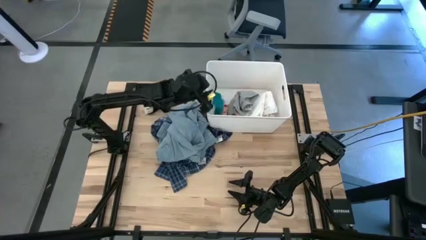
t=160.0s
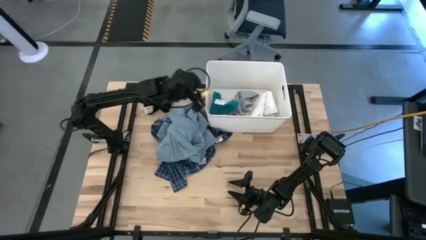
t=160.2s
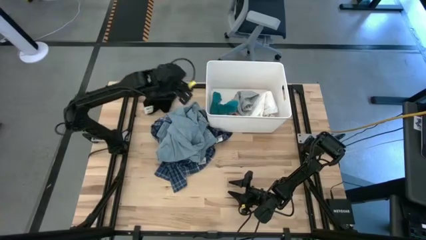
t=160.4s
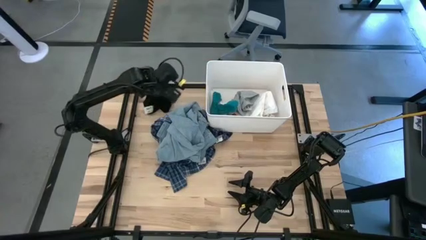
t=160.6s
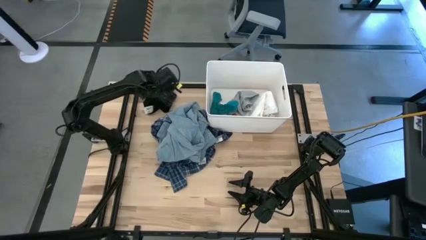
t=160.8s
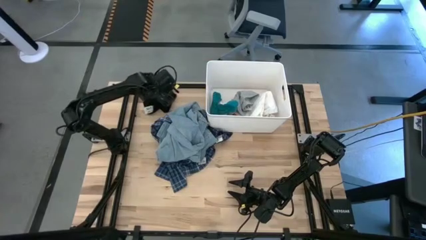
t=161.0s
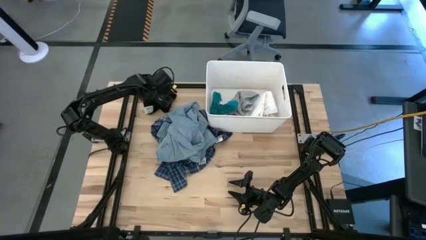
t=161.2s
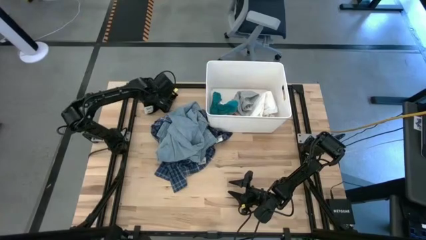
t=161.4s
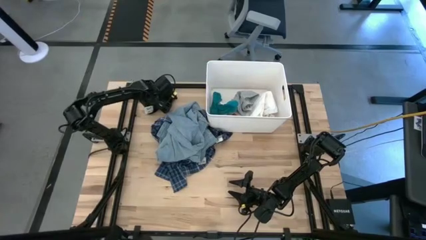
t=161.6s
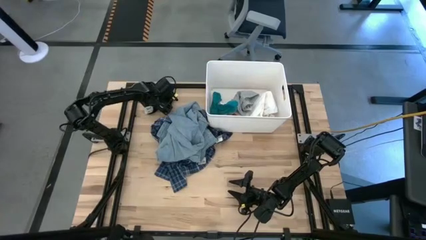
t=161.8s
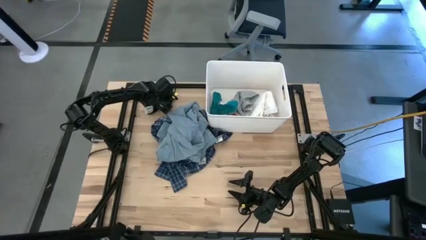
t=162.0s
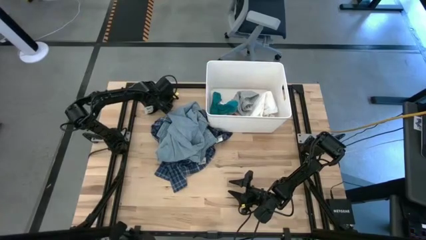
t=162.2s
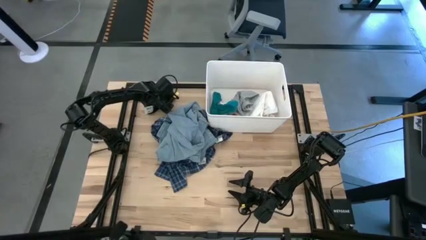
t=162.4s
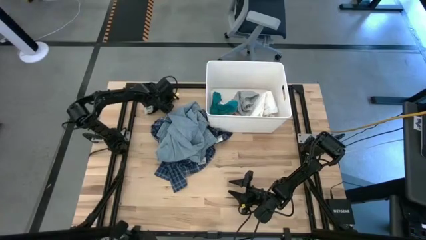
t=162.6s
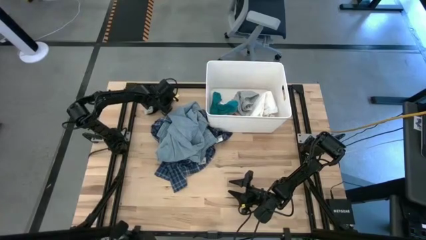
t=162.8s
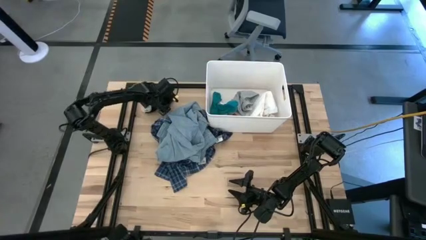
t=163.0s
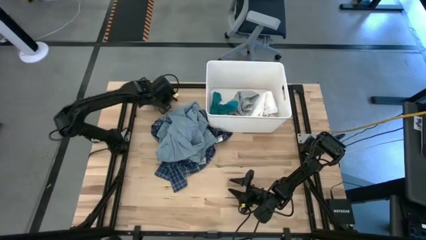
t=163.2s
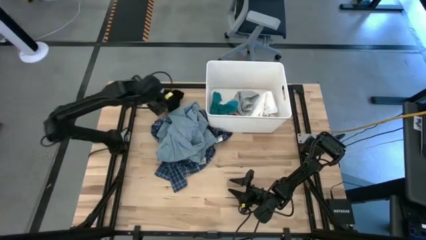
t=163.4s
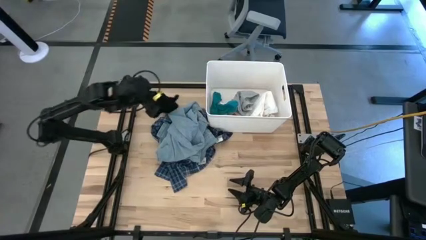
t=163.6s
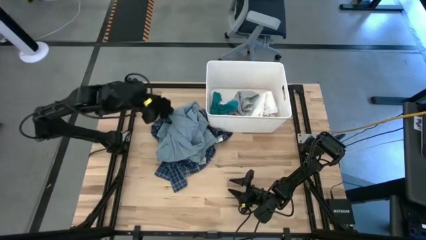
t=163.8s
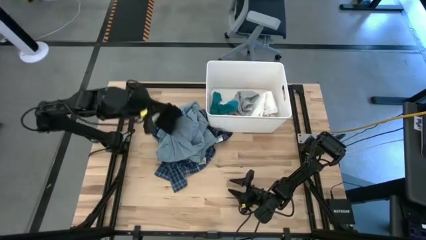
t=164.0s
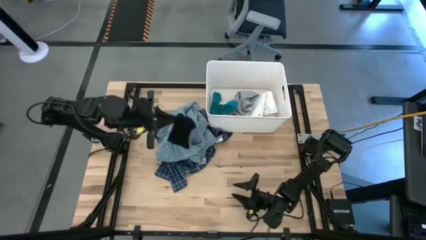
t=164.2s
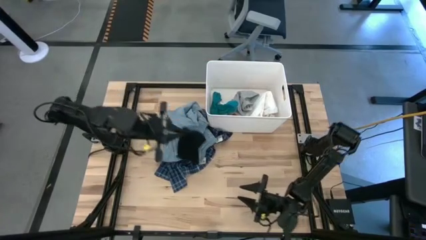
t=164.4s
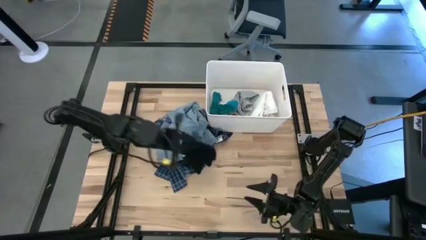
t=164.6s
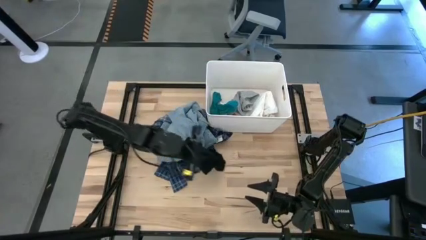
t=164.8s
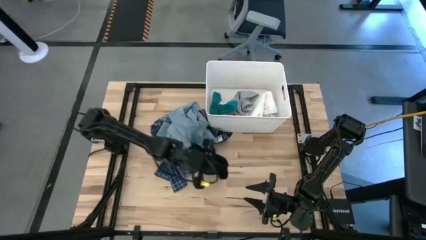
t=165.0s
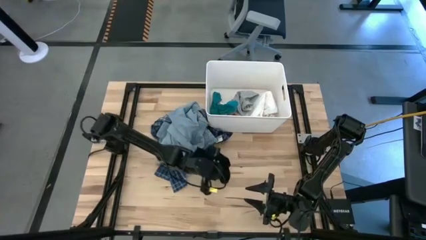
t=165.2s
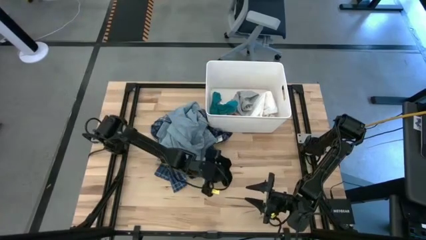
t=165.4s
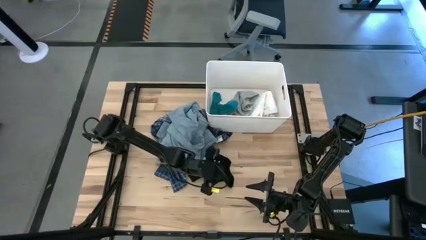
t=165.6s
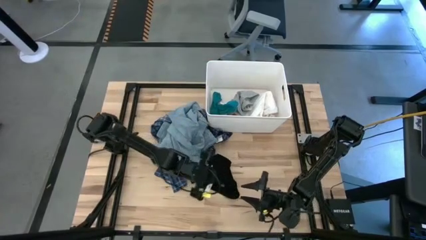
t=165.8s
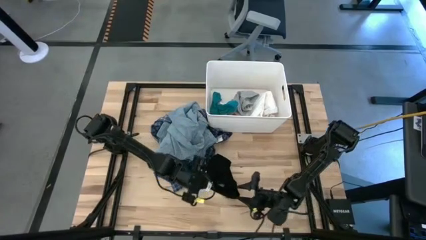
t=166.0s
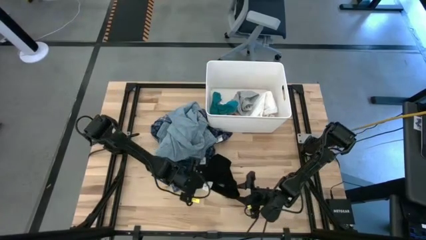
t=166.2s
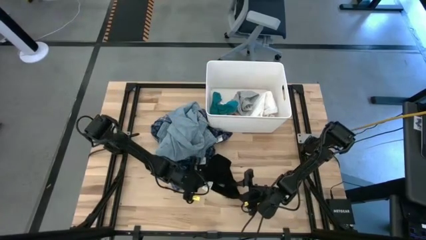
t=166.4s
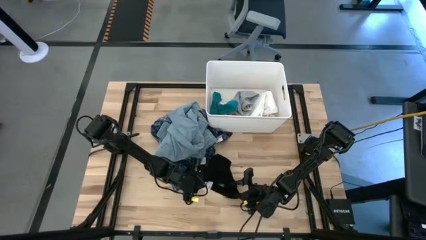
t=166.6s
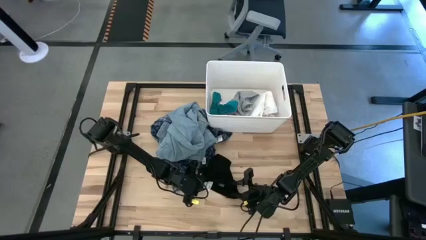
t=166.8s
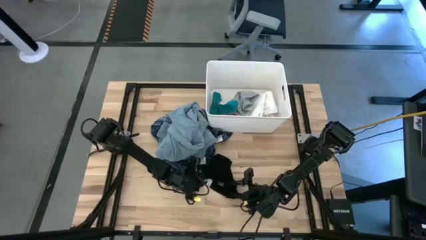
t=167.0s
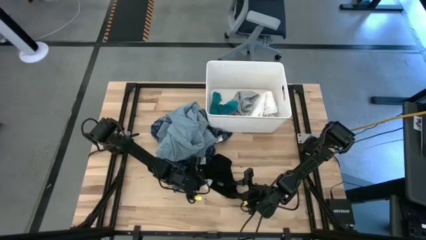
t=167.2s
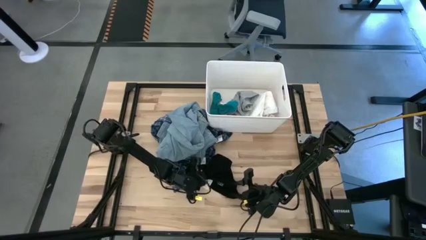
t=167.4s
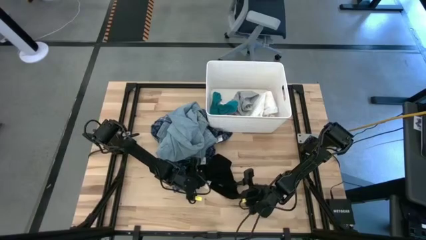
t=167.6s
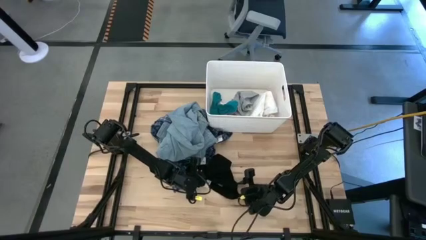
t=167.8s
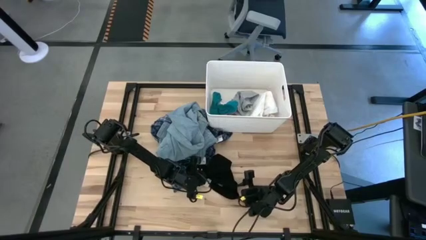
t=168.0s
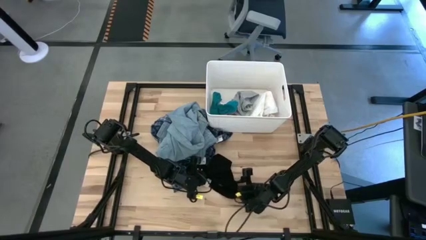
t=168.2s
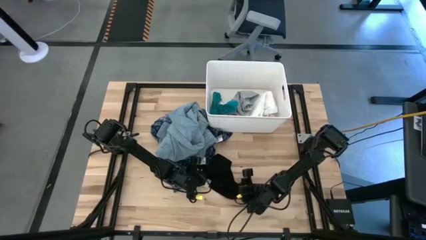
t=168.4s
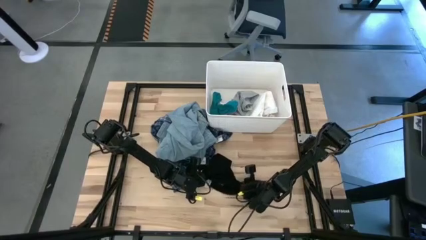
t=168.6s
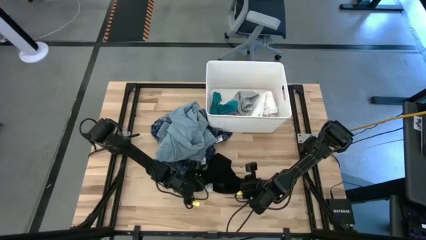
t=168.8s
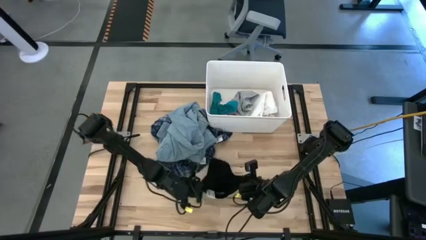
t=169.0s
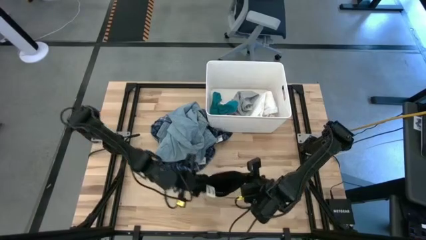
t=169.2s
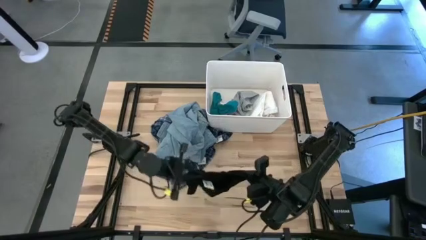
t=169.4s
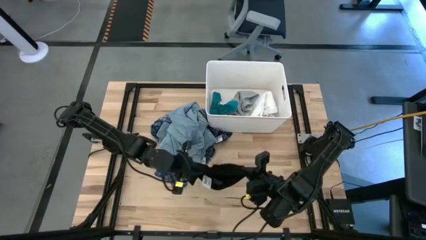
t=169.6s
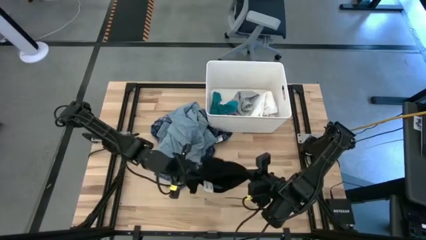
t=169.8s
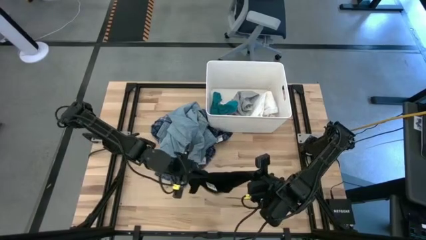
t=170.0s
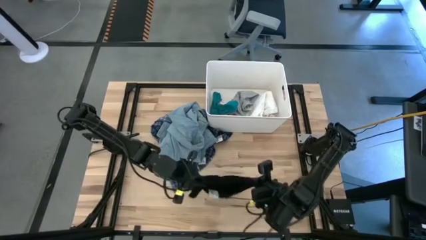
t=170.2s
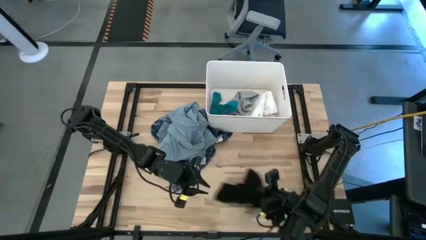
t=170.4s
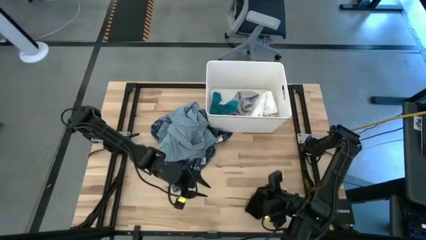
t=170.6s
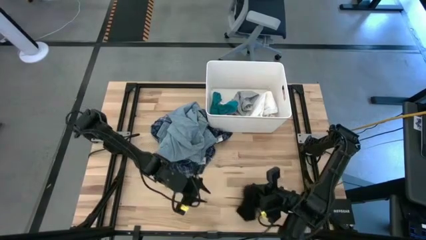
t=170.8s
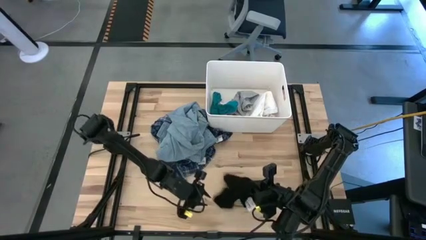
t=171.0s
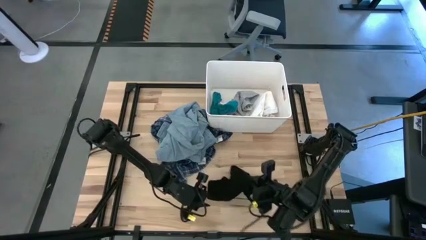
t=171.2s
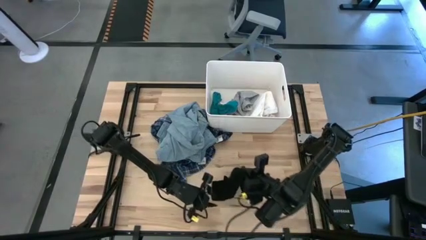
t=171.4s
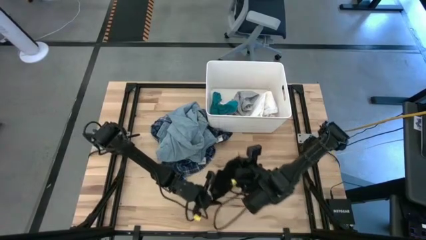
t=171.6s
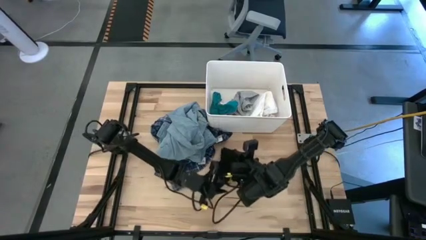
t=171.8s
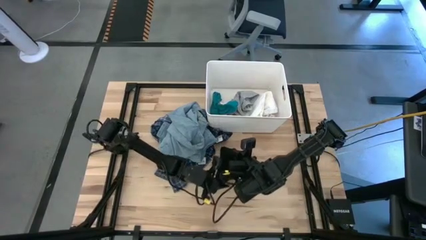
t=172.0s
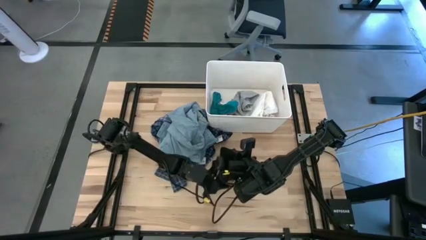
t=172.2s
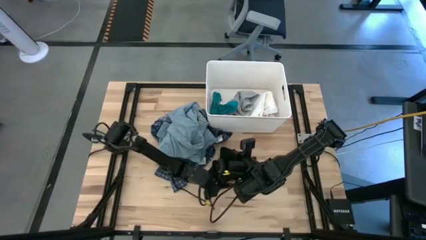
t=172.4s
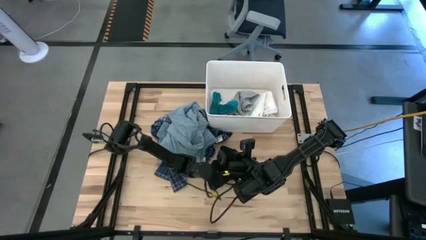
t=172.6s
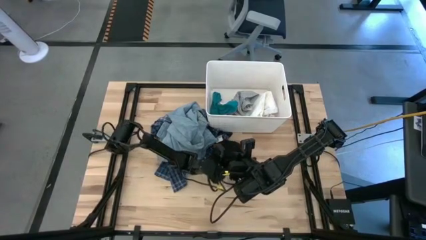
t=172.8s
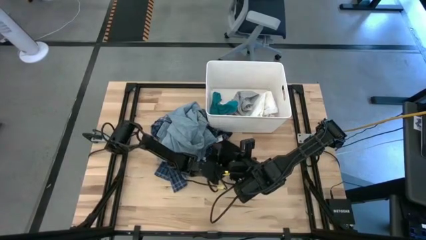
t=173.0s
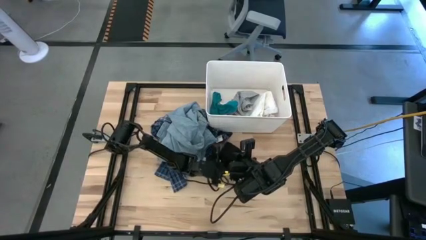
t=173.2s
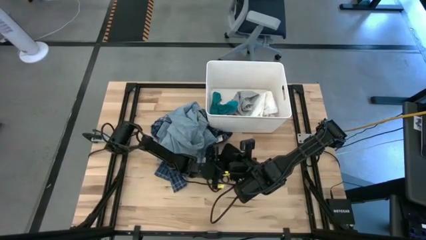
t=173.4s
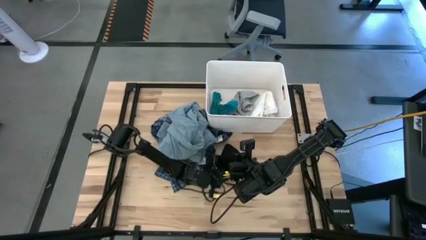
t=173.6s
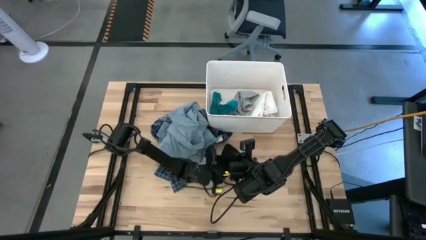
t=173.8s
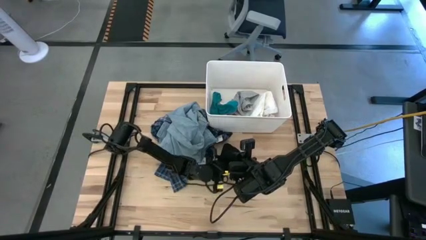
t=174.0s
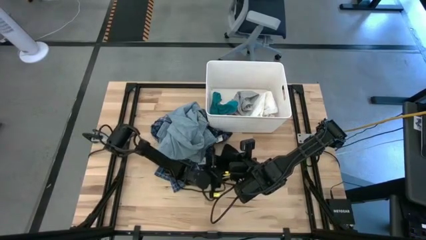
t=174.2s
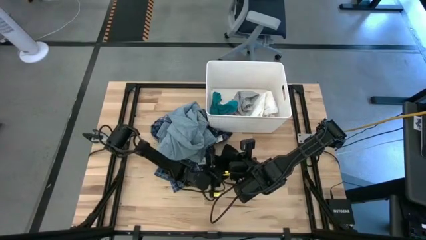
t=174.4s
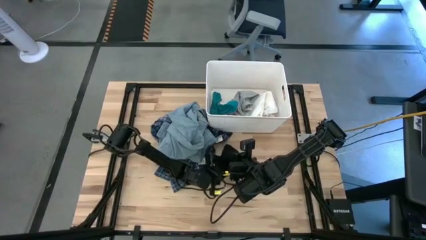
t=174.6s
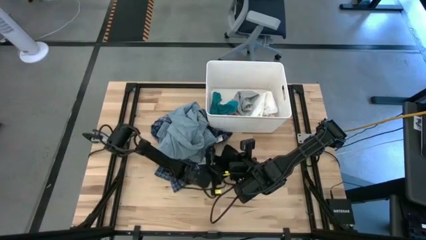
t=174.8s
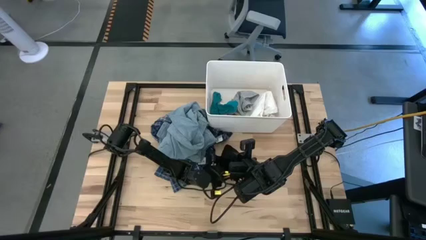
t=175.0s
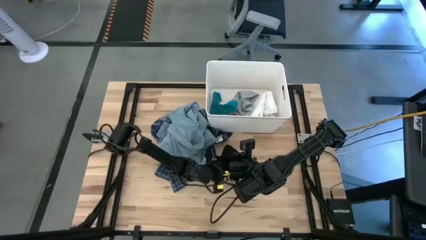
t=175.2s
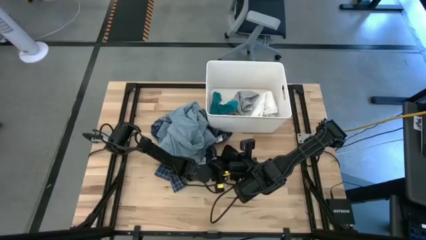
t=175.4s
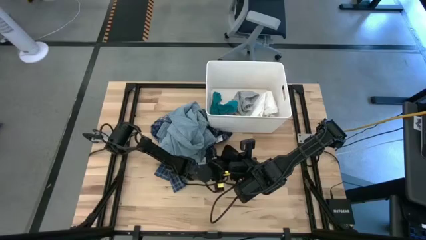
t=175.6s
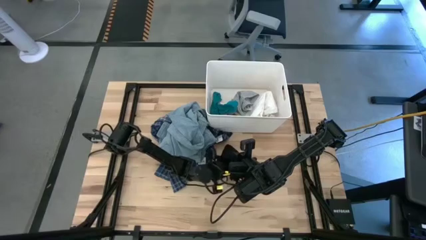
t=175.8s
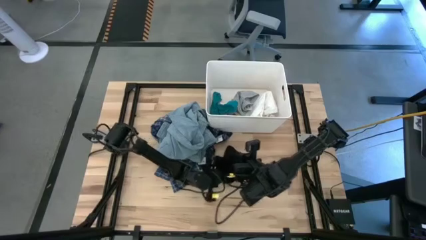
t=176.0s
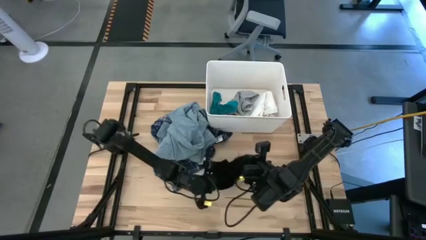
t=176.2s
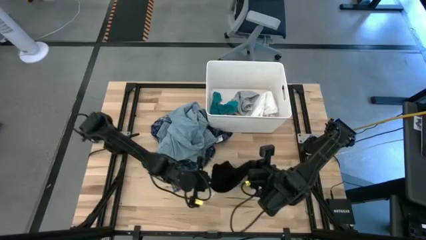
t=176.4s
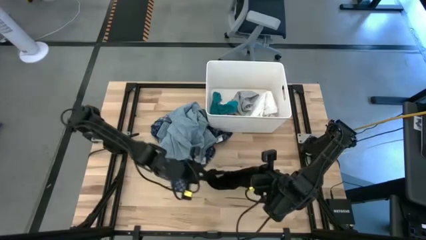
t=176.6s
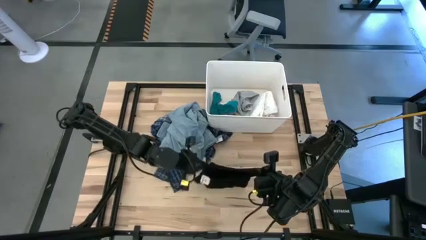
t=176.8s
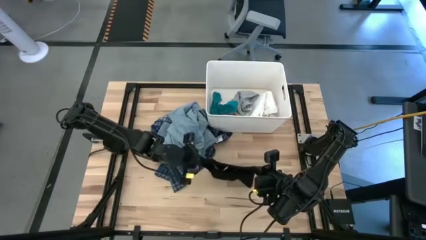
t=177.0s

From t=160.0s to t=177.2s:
Task: Sort clothes
Put the black boxer into the white laundry bin
